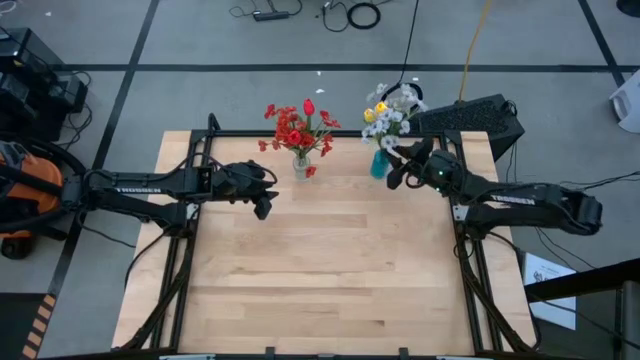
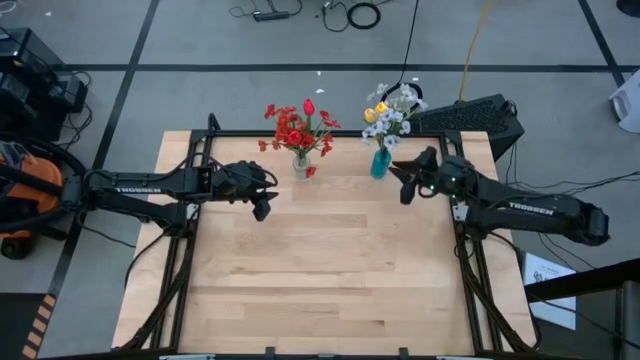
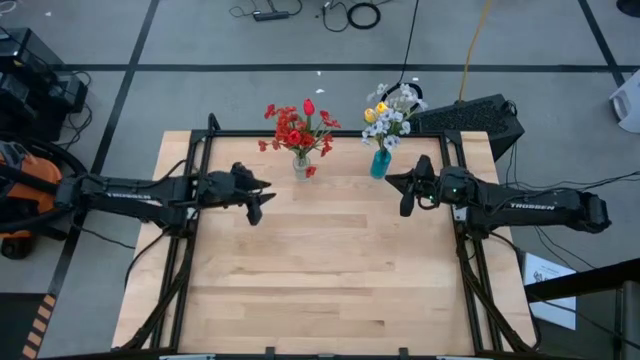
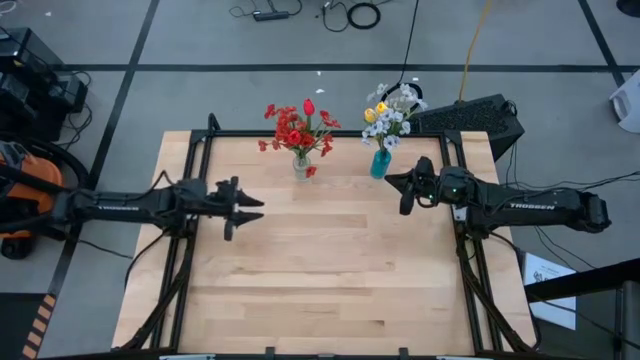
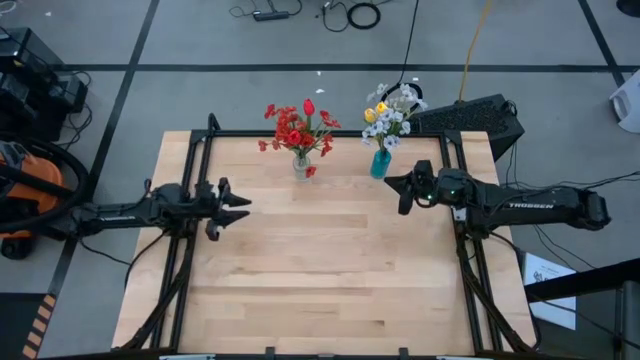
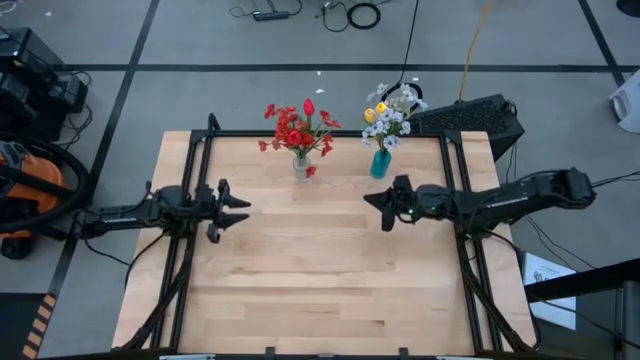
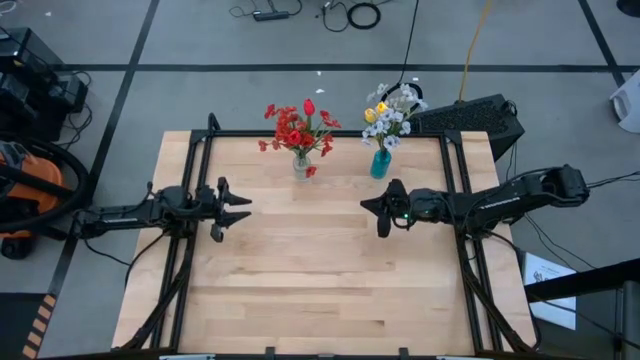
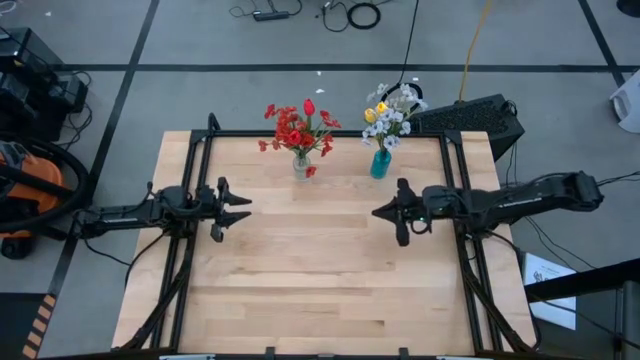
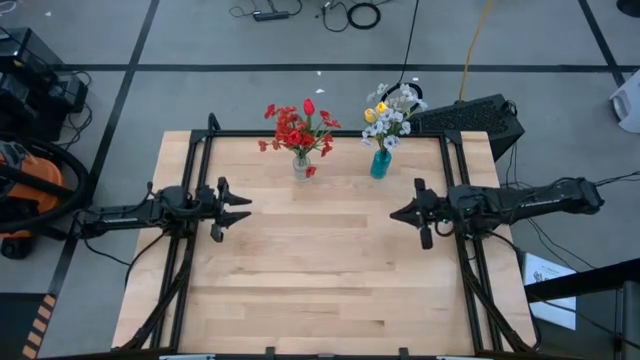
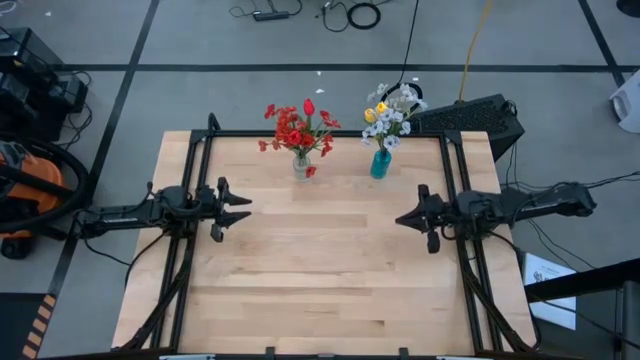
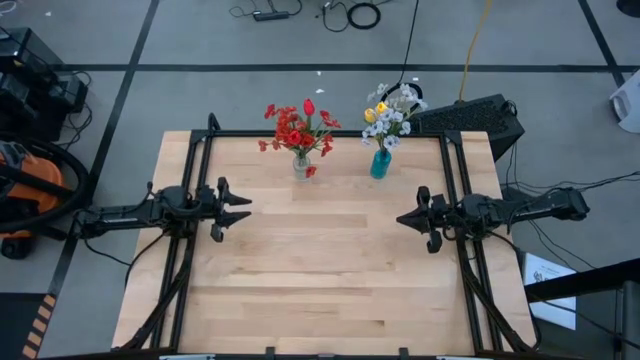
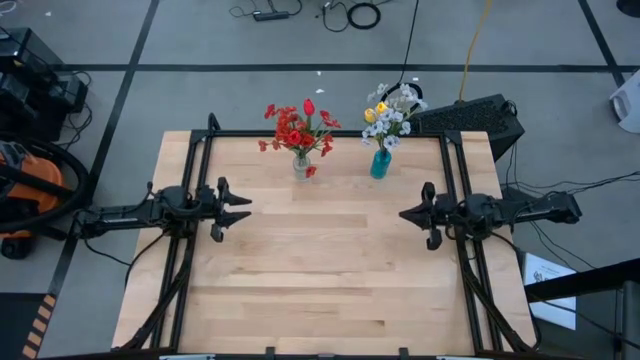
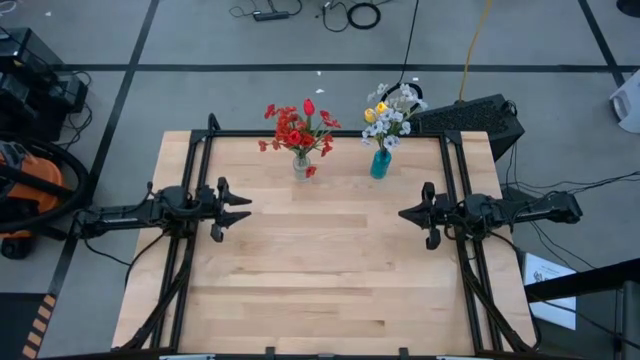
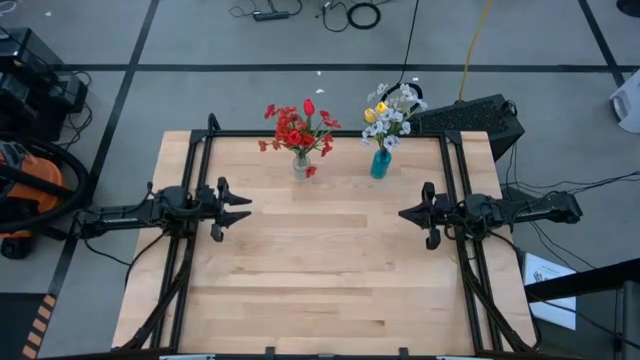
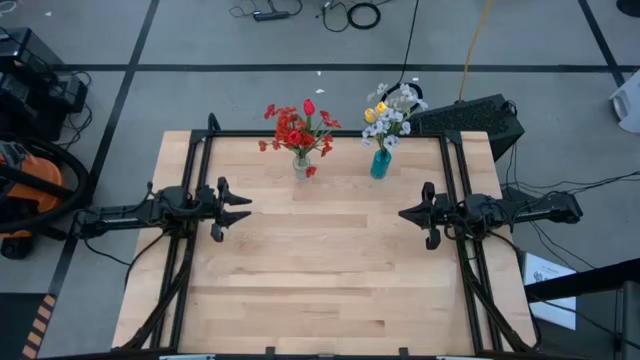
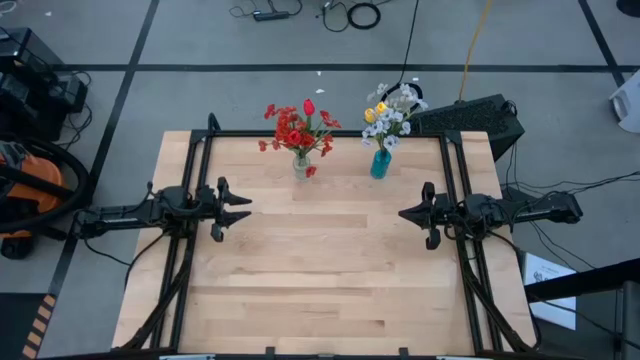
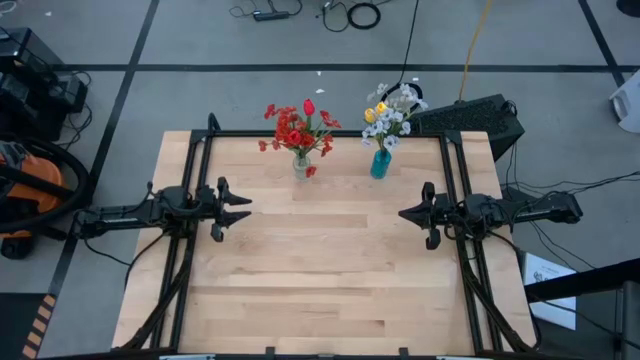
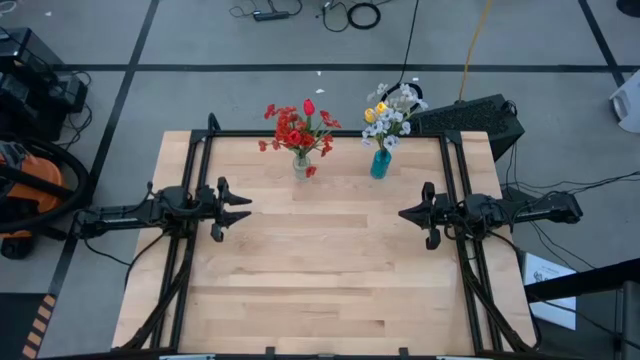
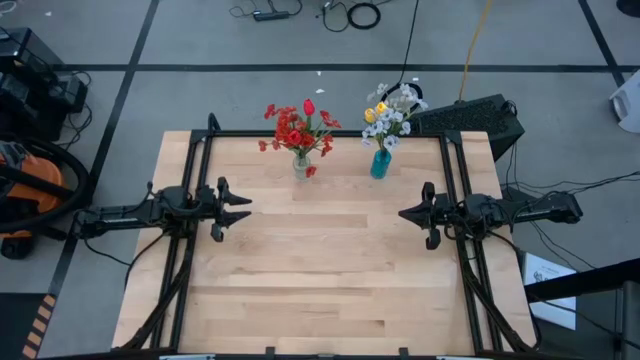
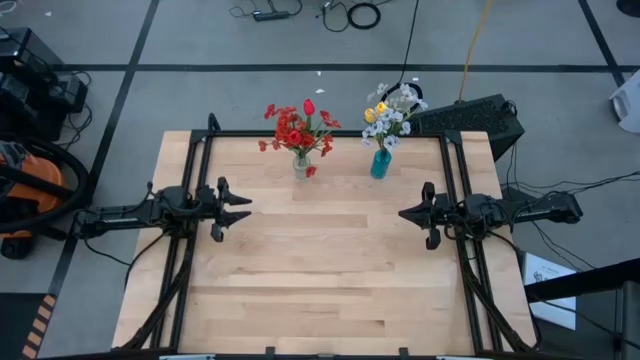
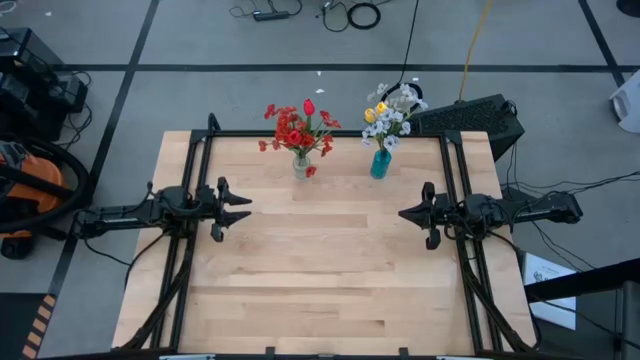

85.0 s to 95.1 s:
Task: Sort flowers into vase by color
Return to Home Position

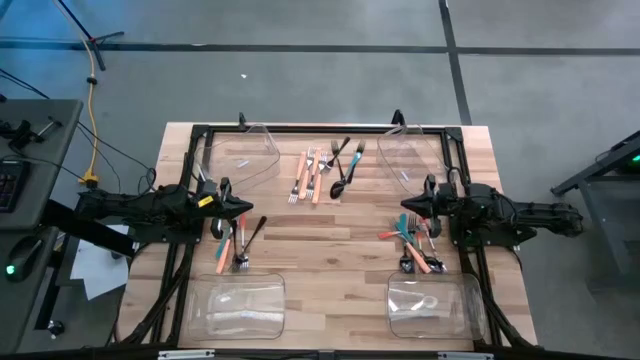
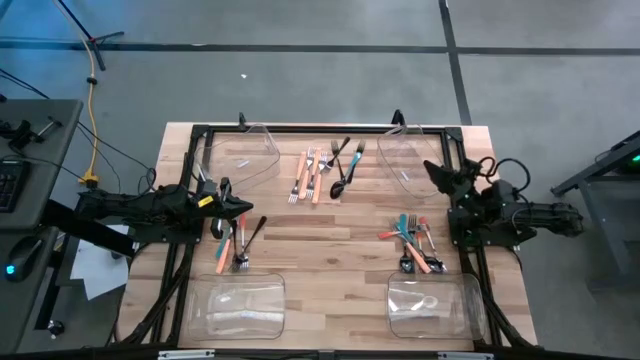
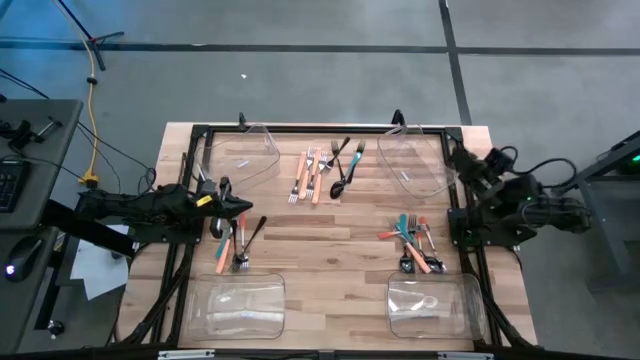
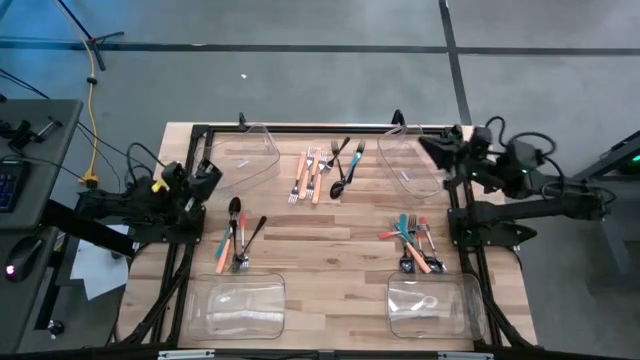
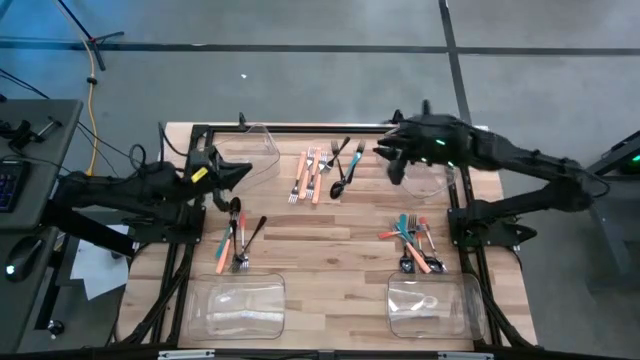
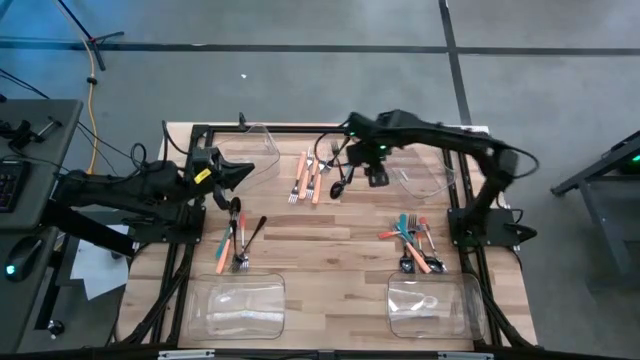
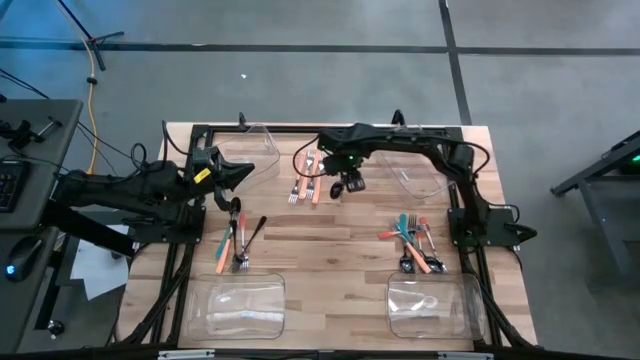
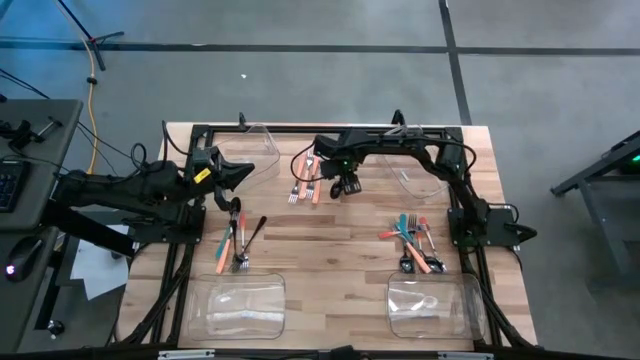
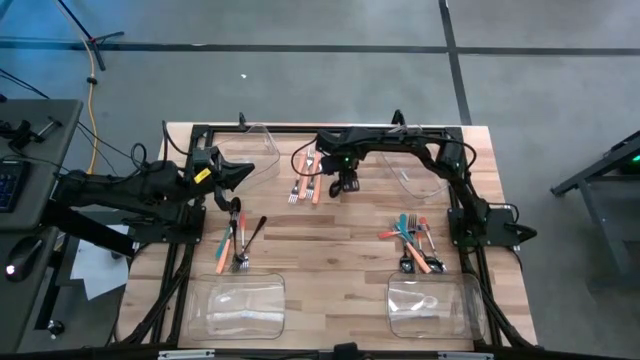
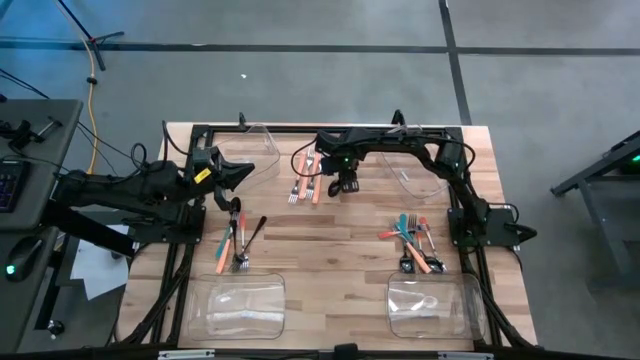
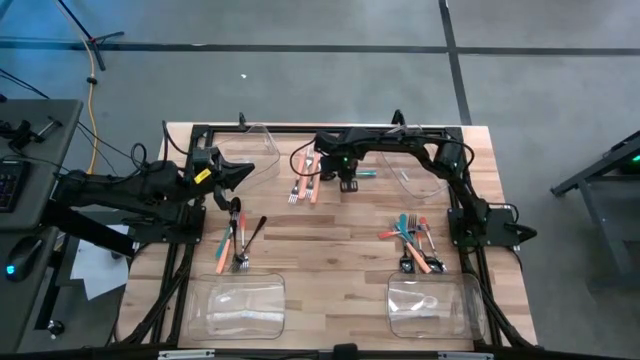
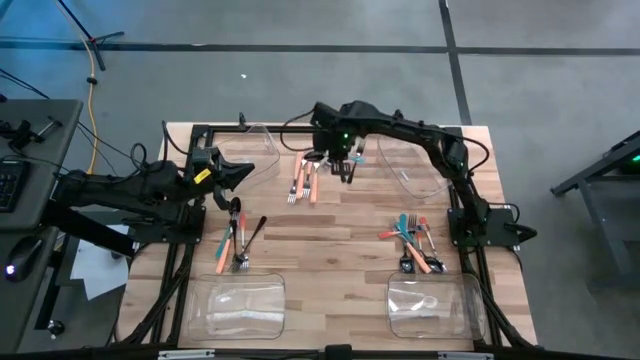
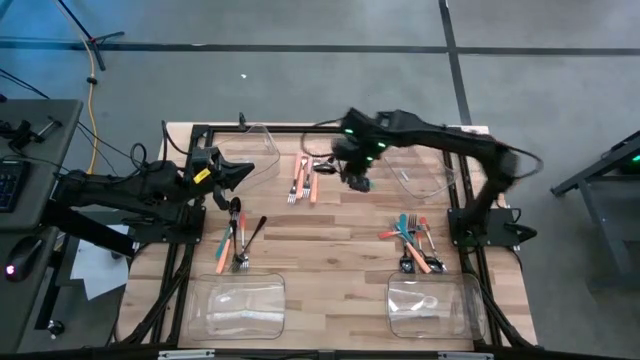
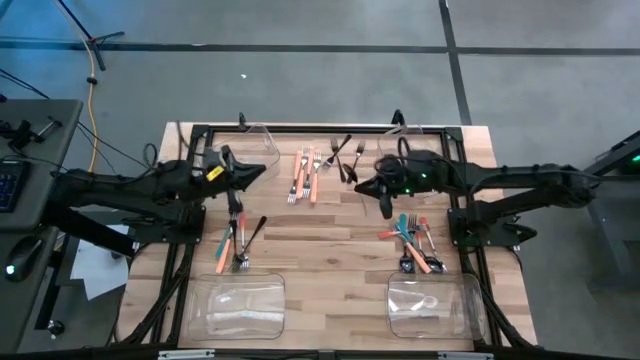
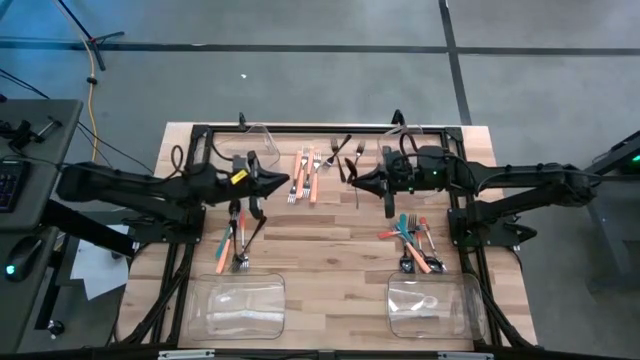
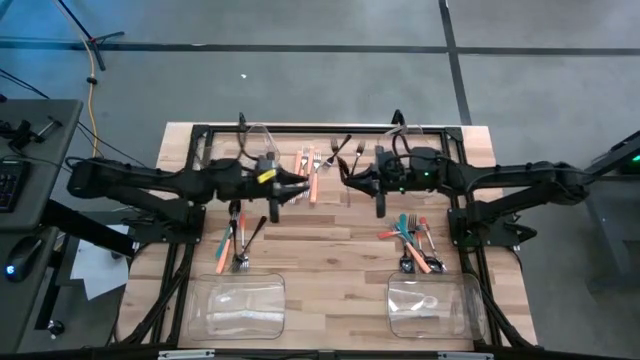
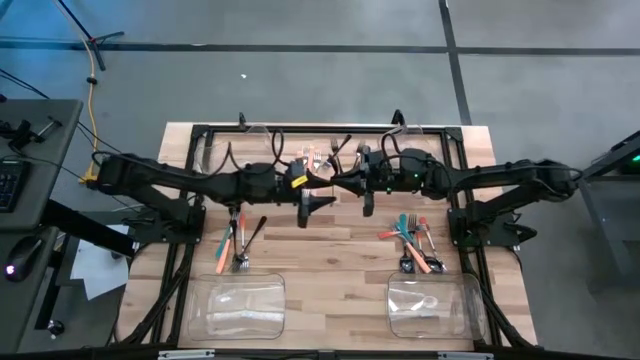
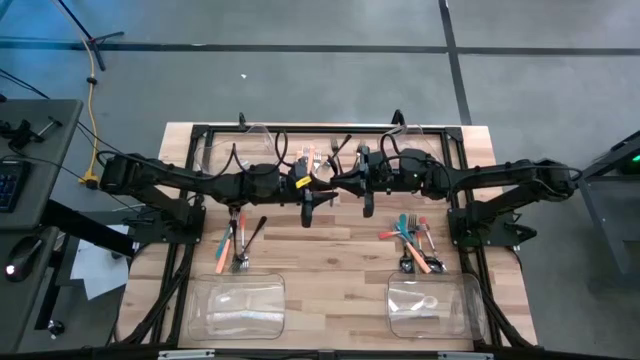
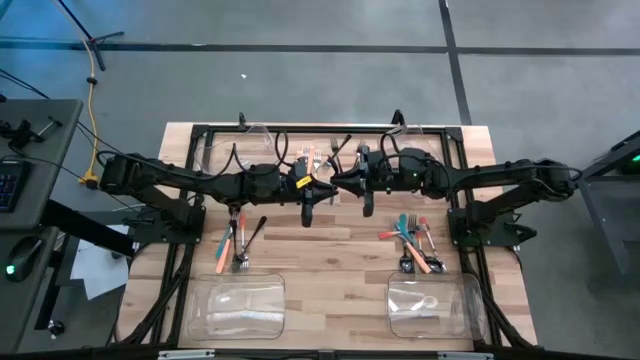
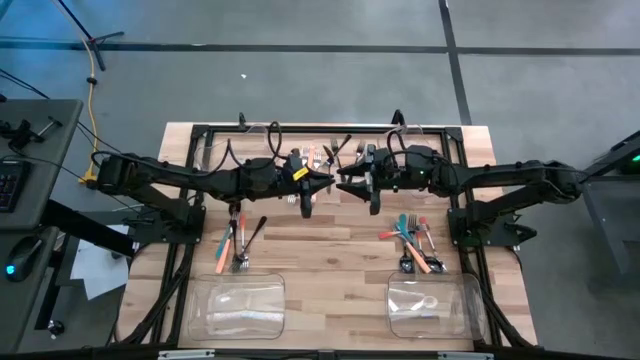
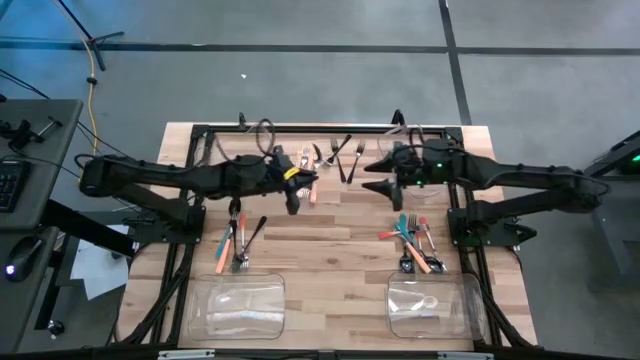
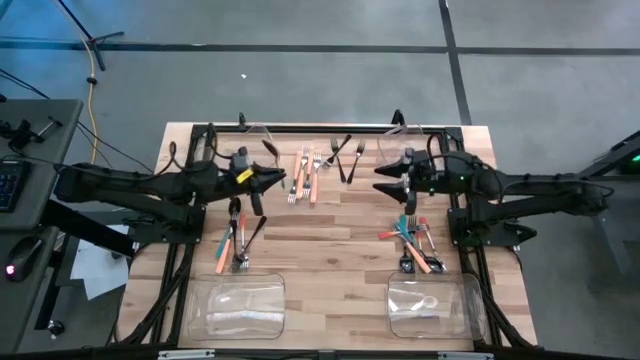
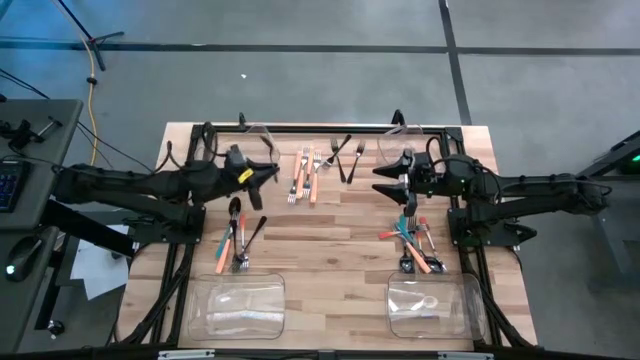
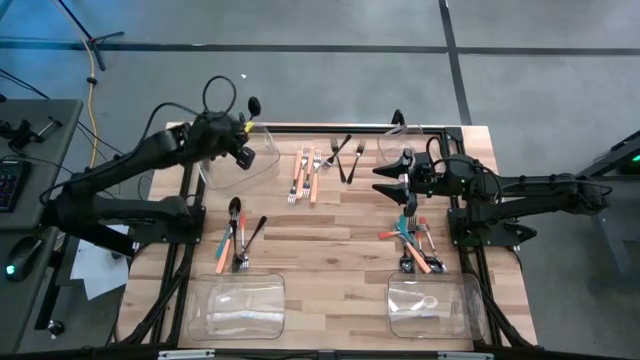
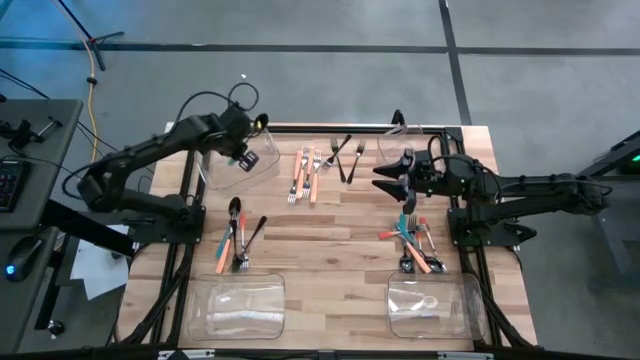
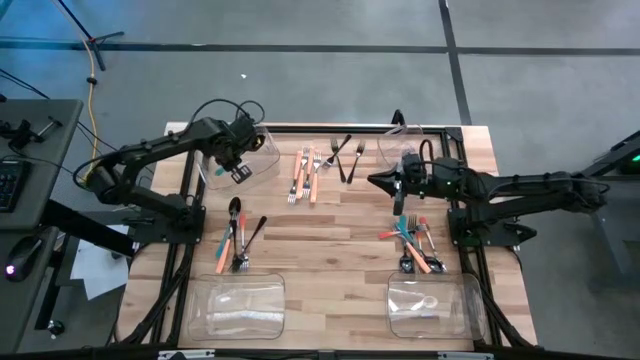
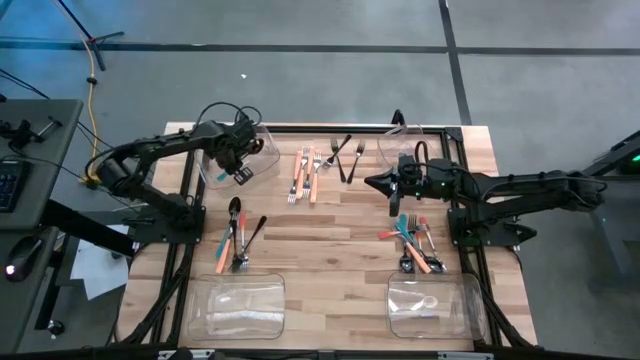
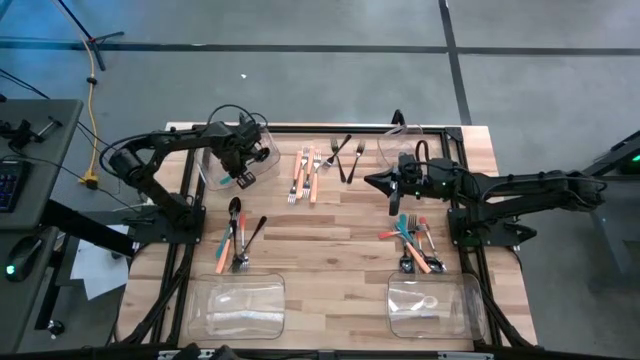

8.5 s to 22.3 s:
Task: Sort silverware by color (type)
Put the blue spoon into the top left transparent bin
